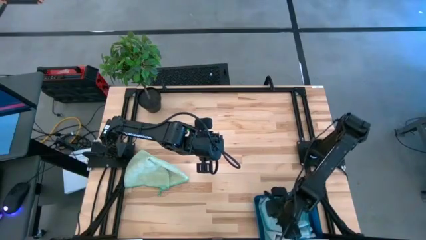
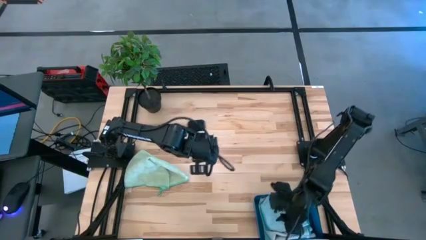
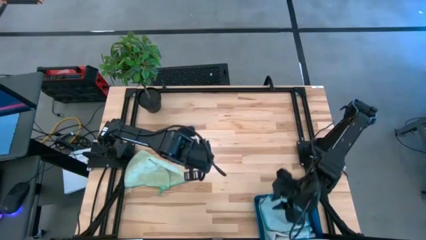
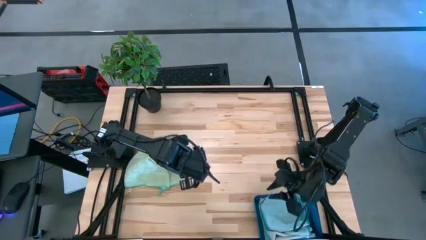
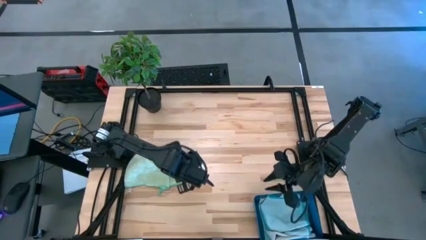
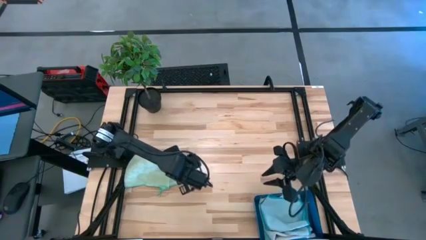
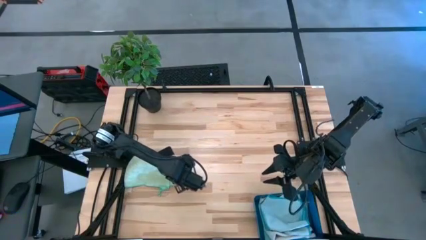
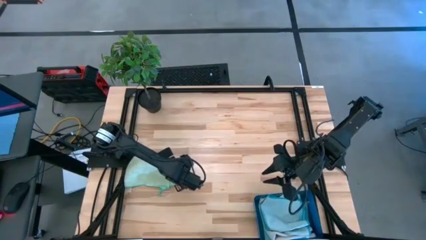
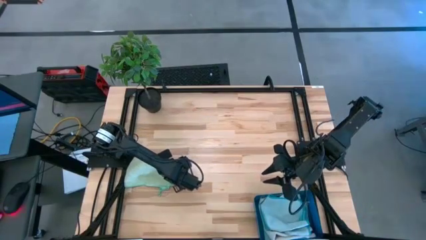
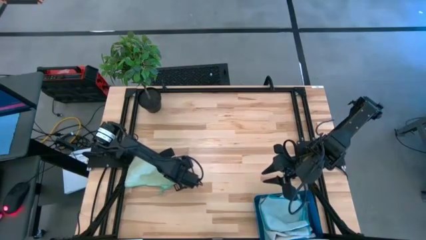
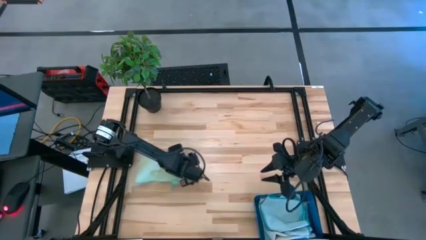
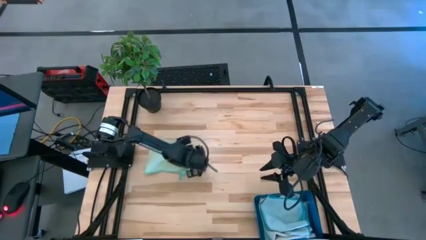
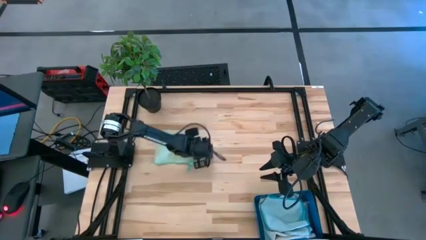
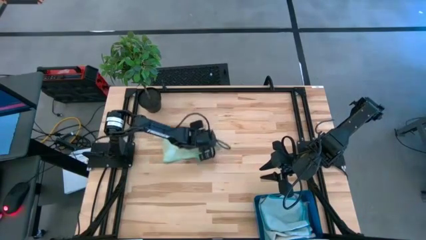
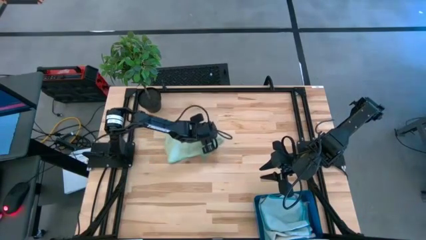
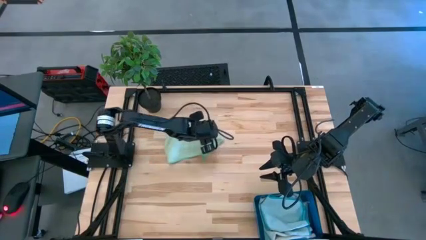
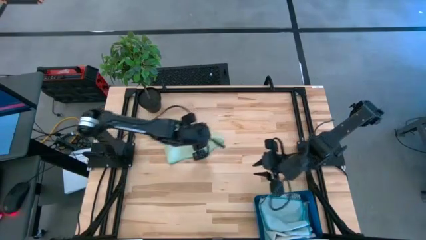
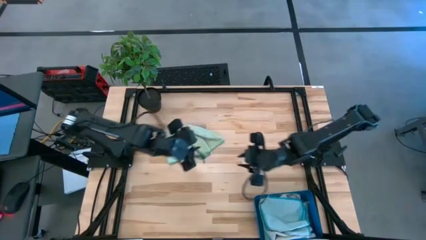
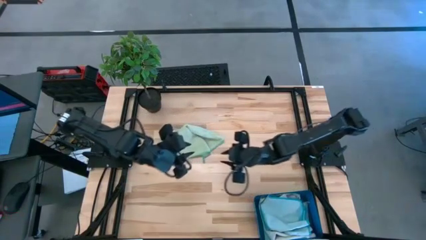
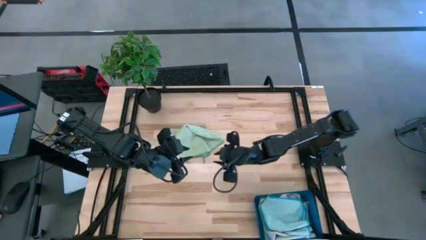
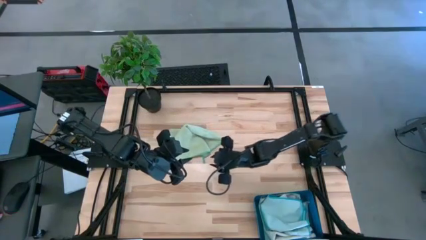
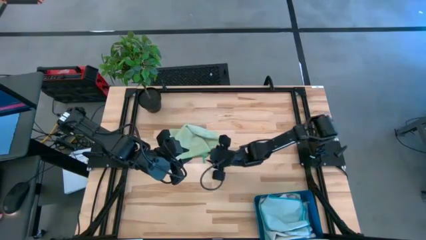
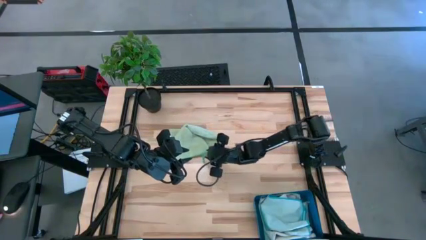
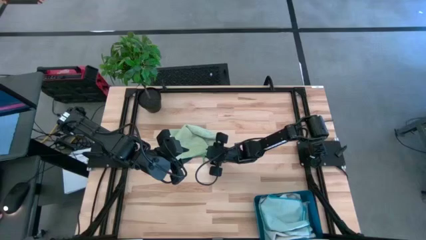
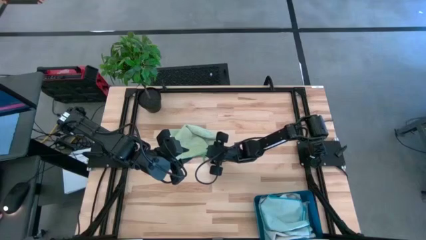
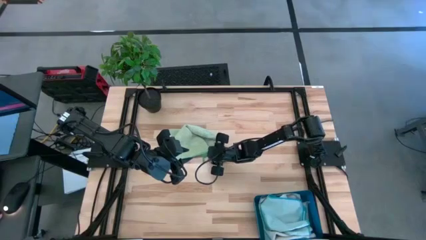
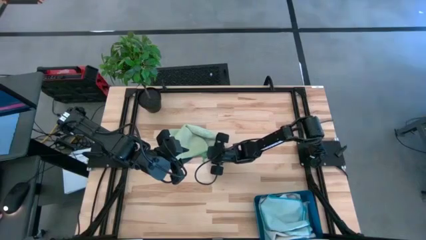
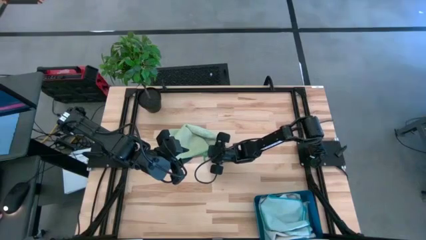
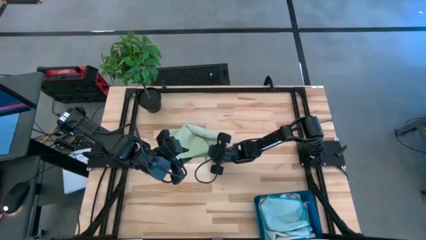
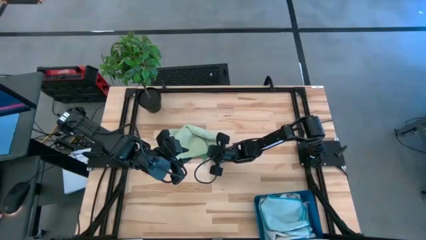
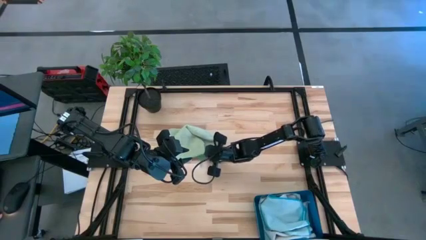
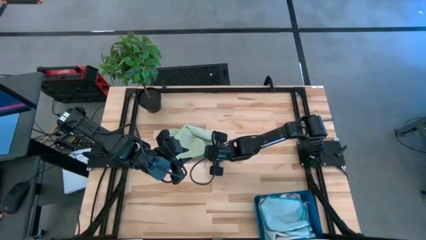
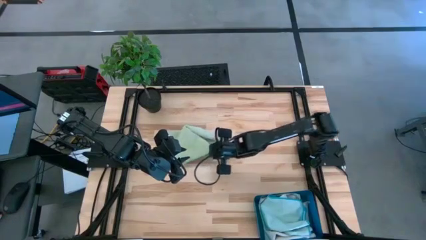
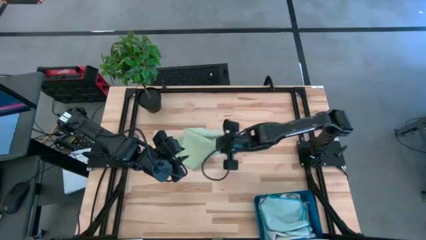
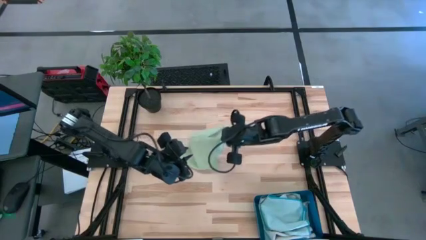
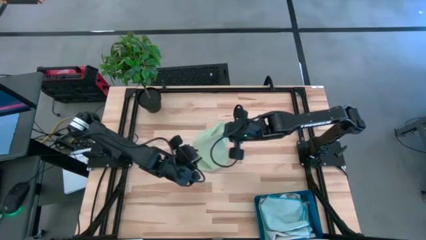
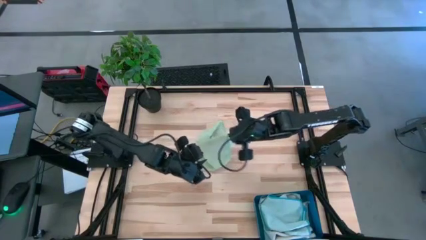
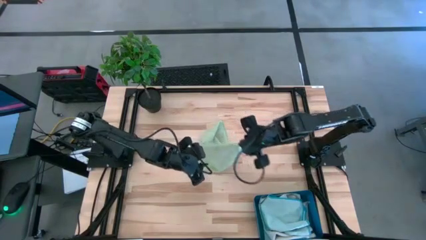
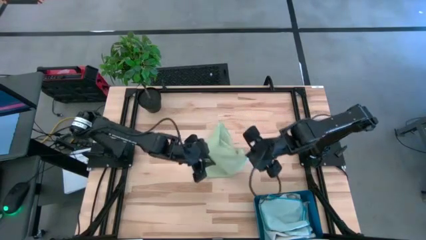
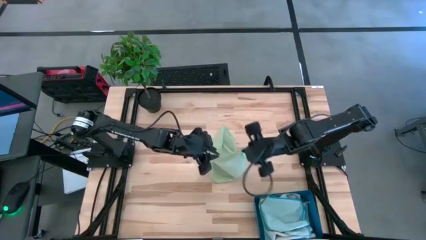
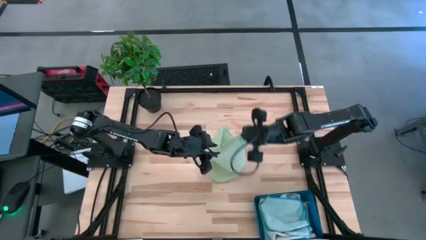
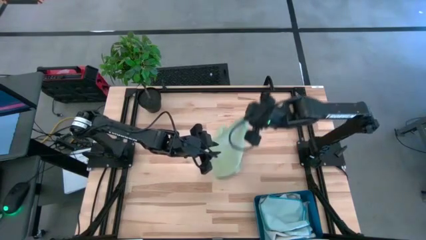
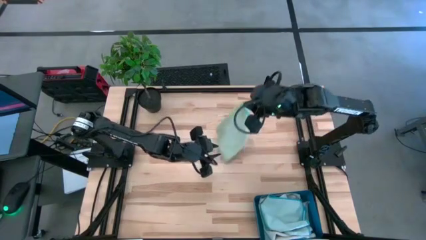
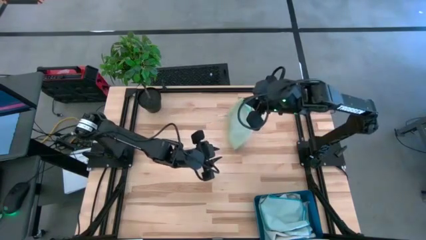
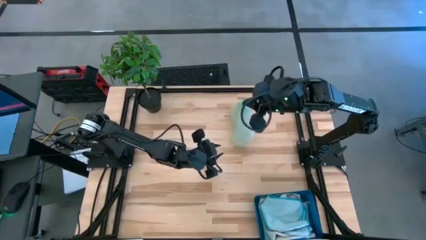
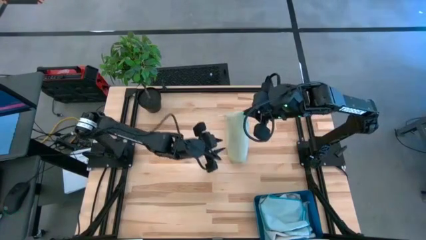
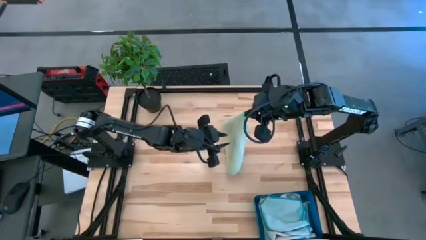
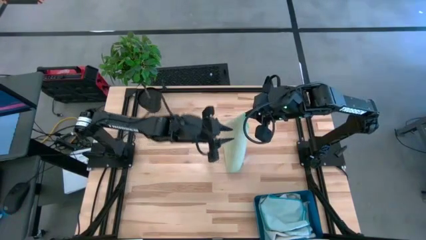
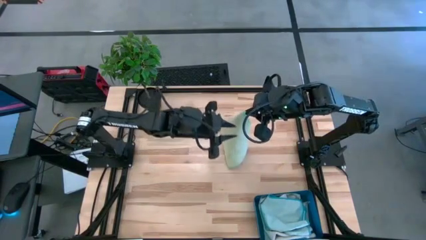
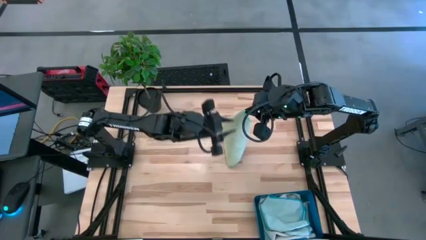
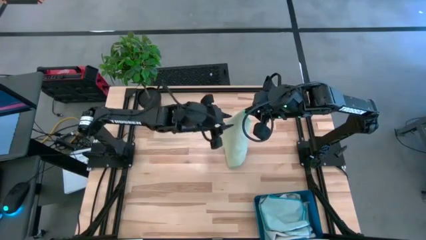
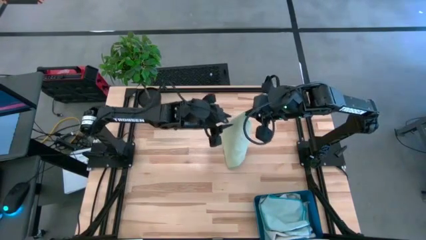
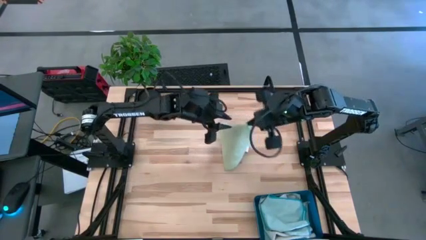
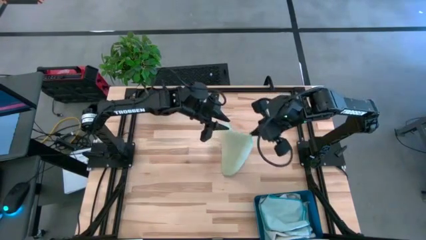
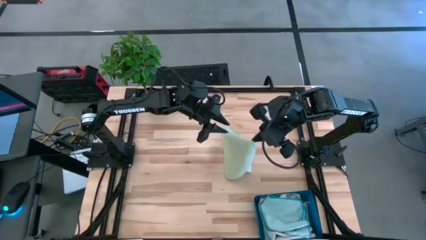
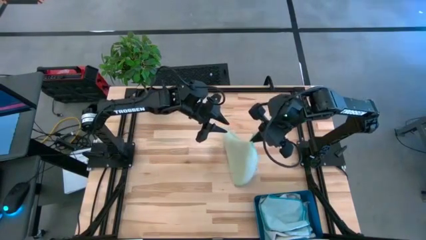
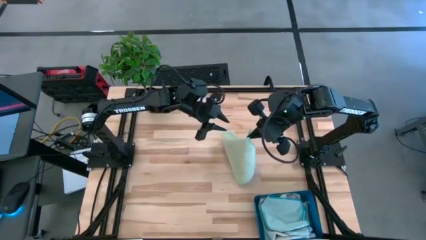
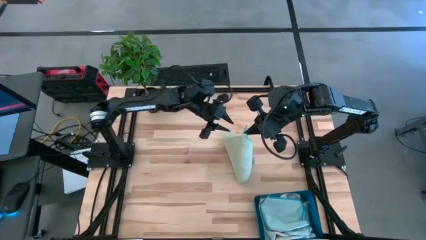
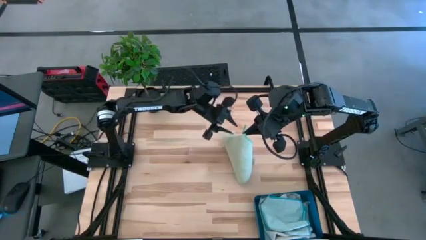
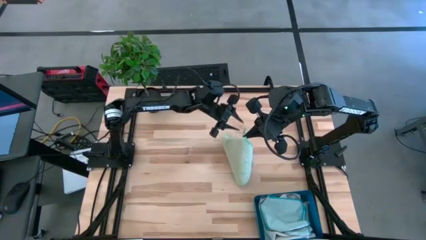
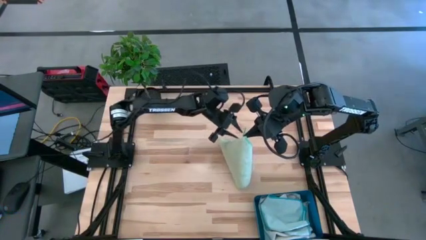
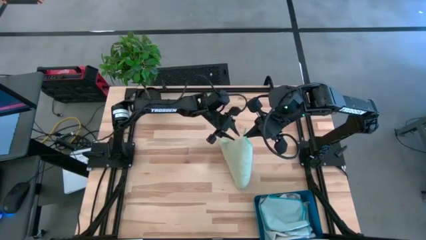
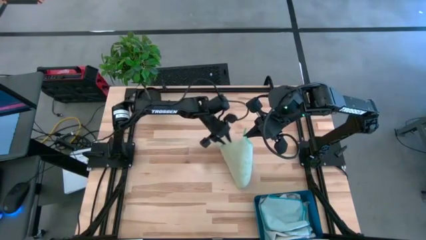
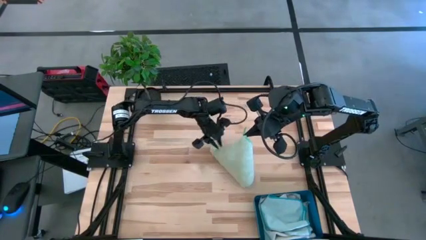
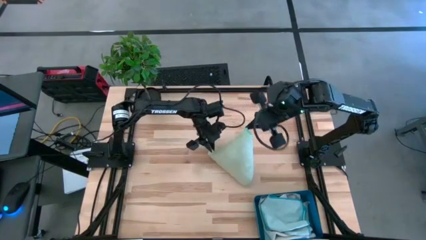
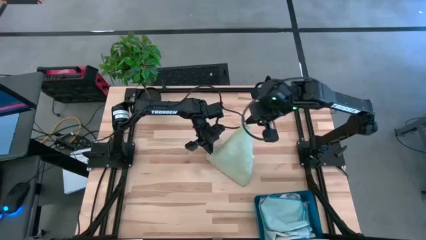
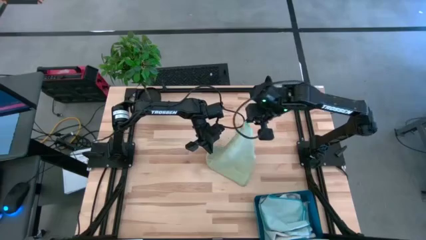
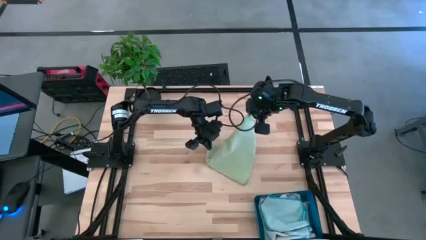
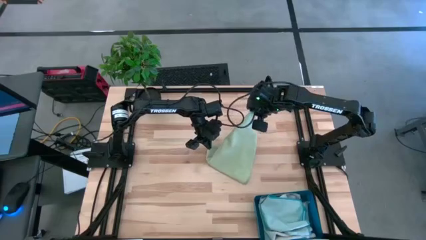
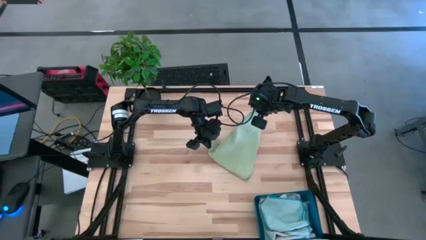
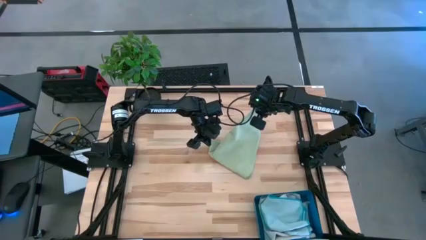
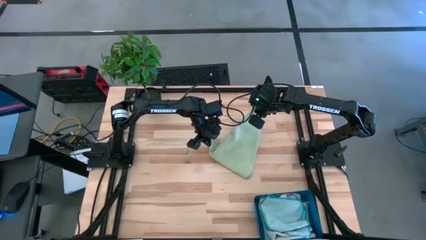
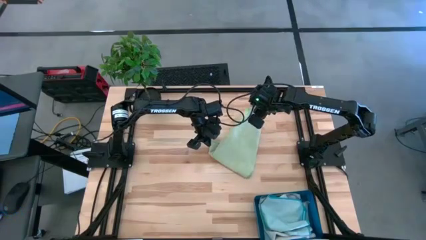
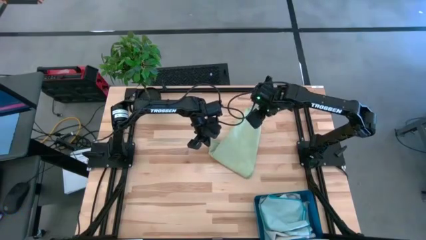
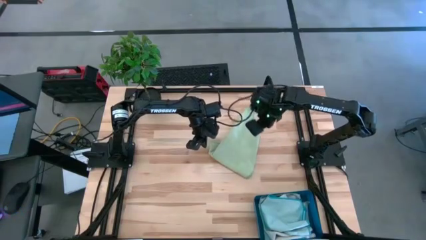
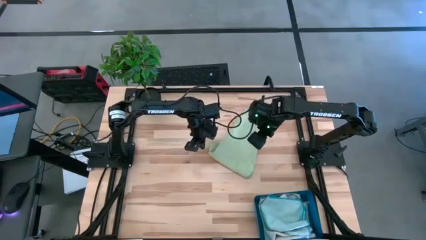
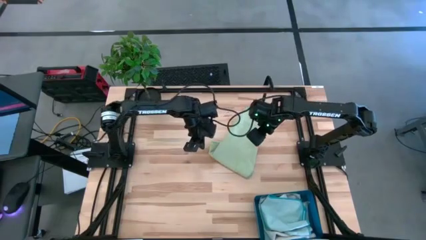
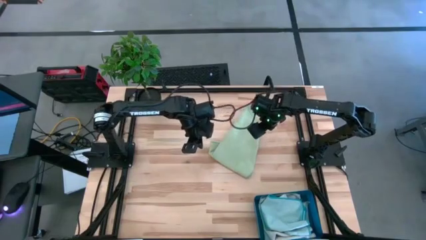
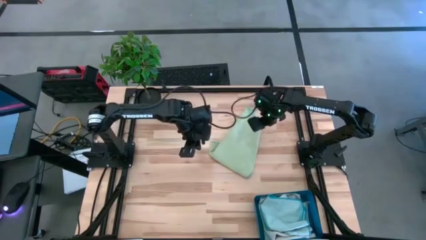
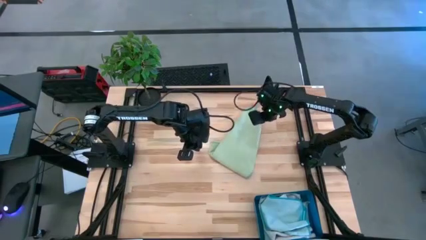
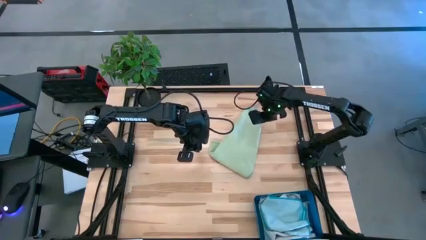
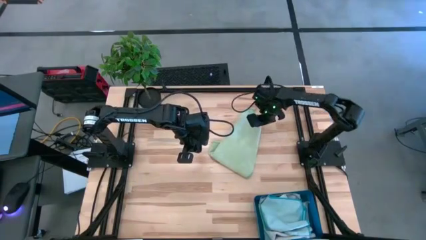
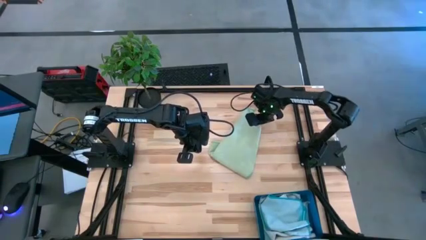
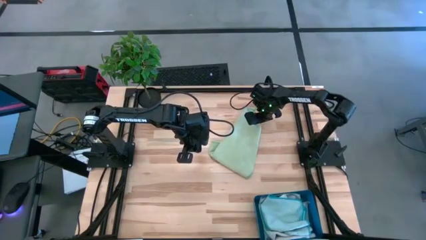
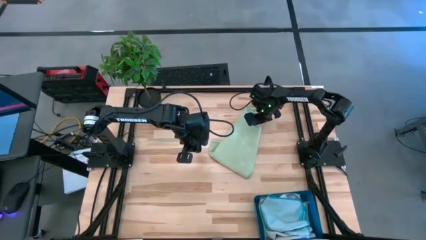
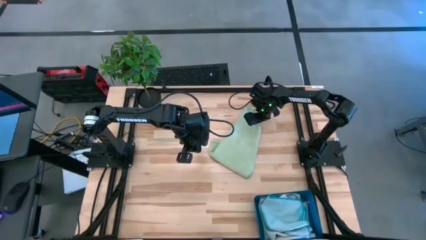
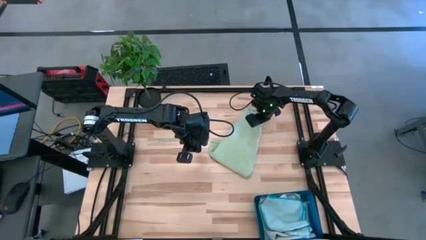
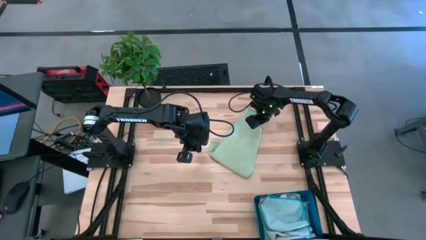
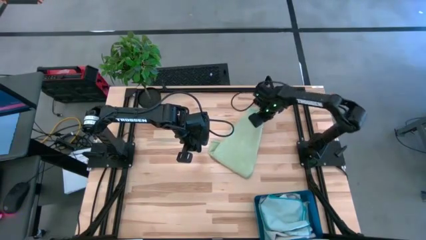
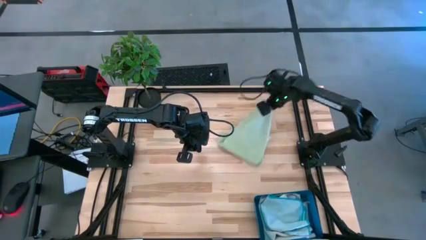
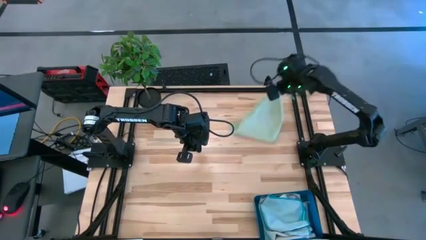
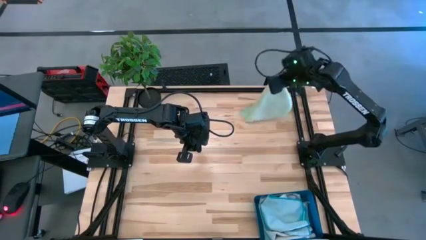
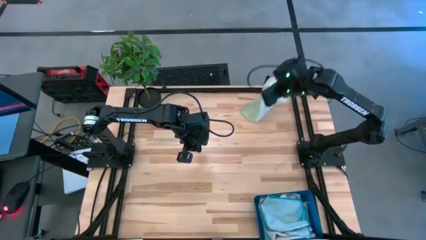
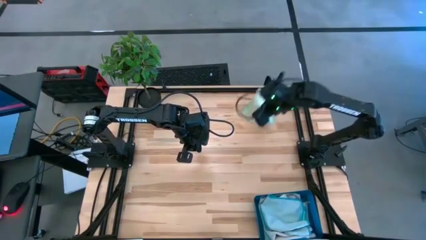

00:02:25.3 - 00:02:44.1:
Task: Fold microfiber towels
Fold the green microfiber cloth
